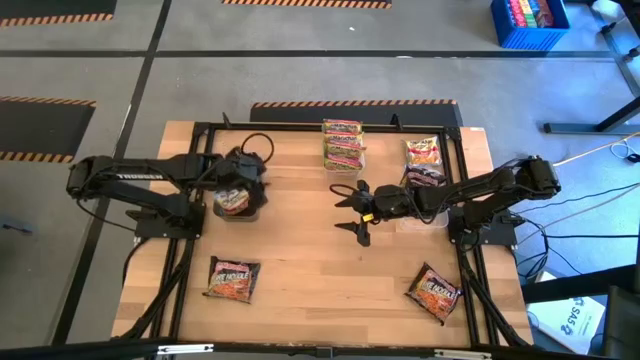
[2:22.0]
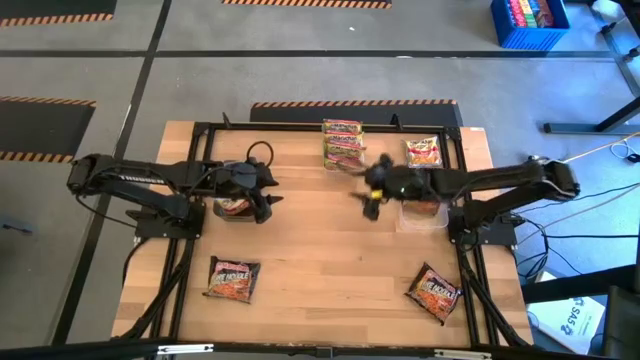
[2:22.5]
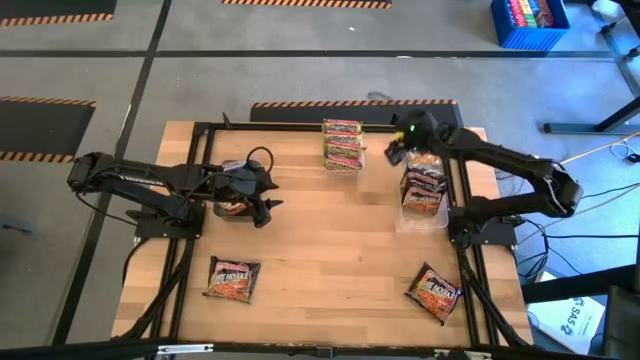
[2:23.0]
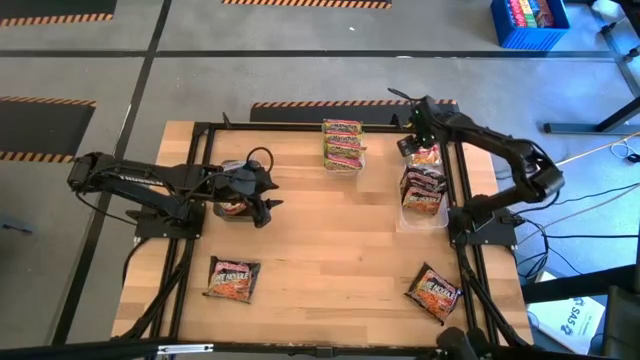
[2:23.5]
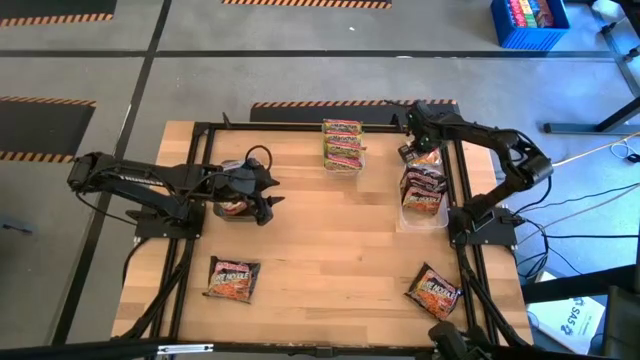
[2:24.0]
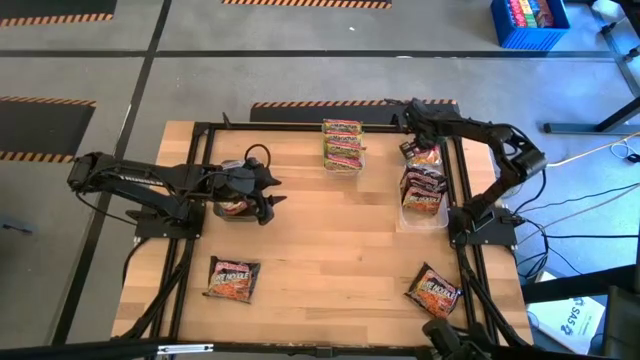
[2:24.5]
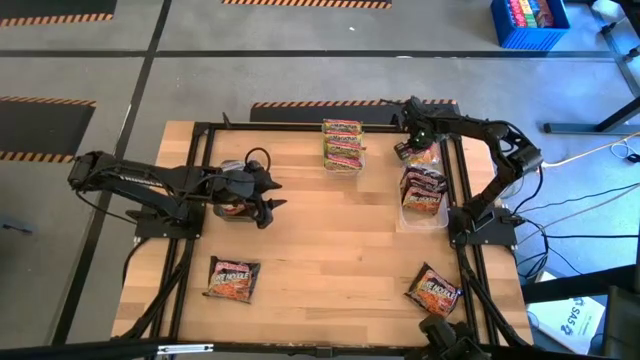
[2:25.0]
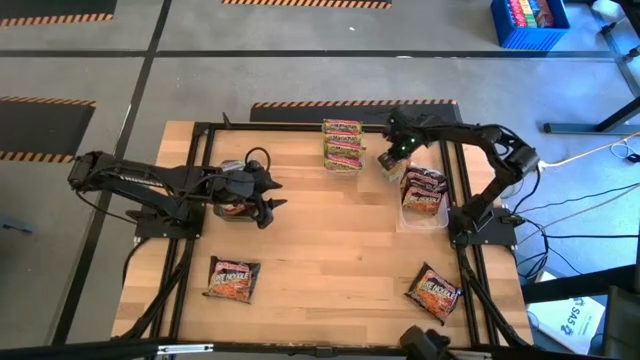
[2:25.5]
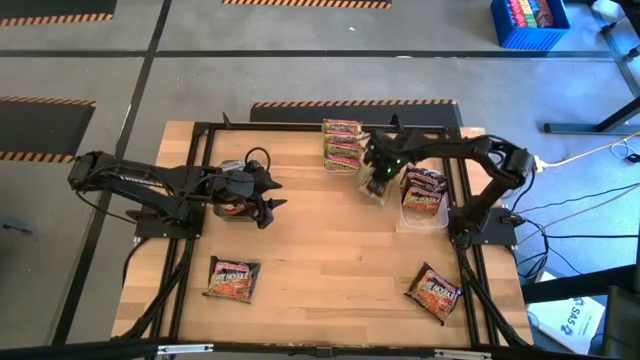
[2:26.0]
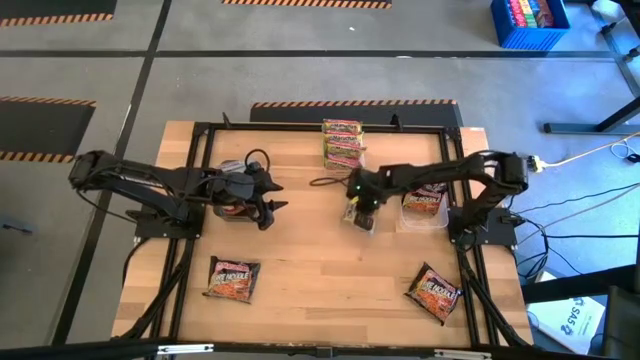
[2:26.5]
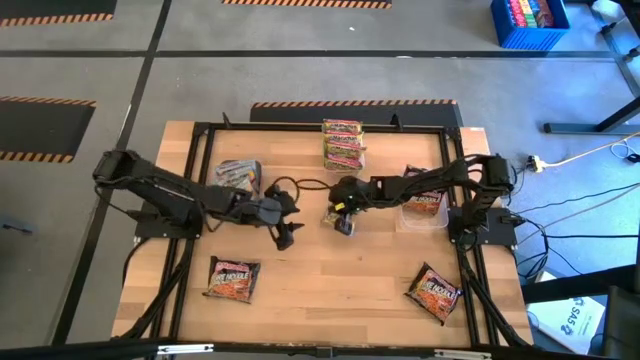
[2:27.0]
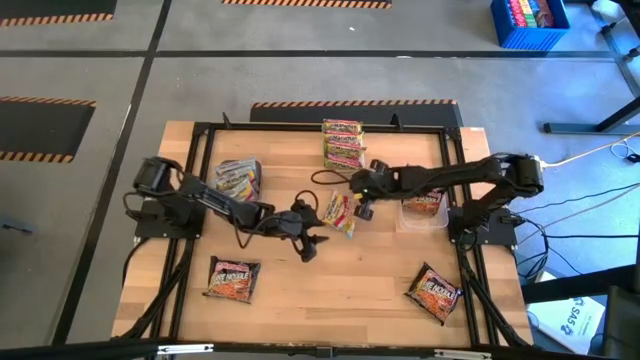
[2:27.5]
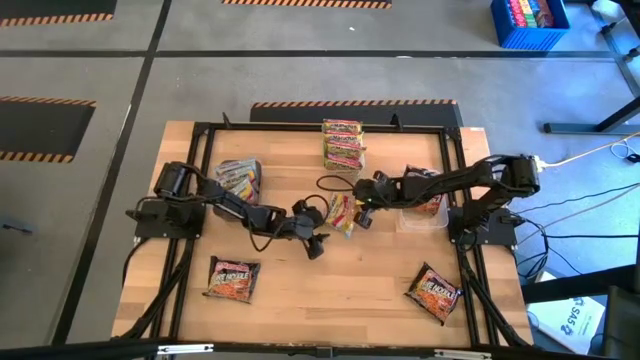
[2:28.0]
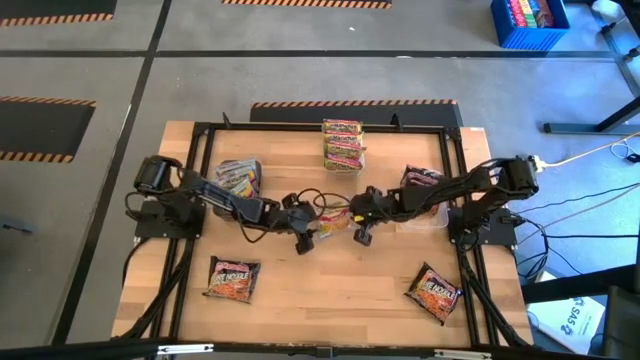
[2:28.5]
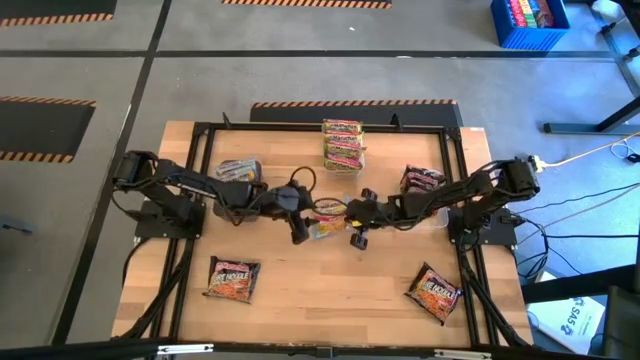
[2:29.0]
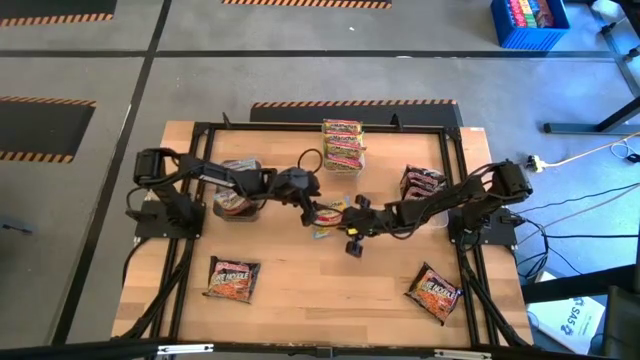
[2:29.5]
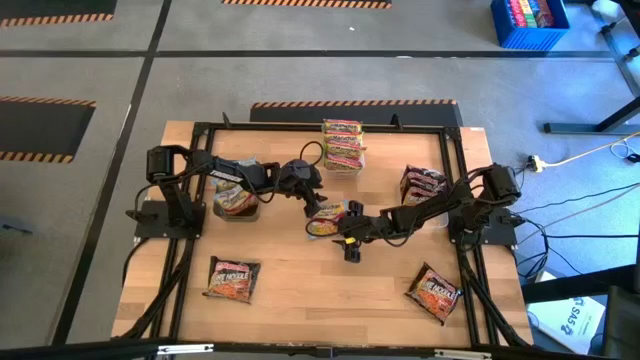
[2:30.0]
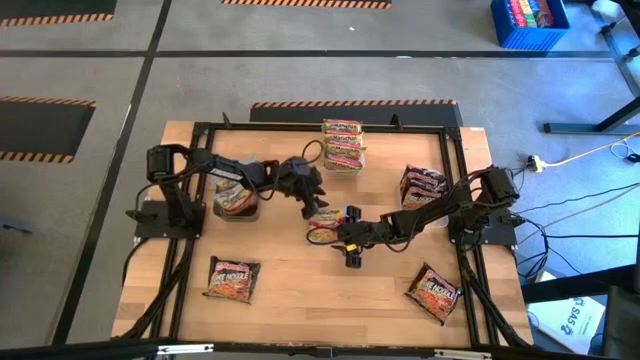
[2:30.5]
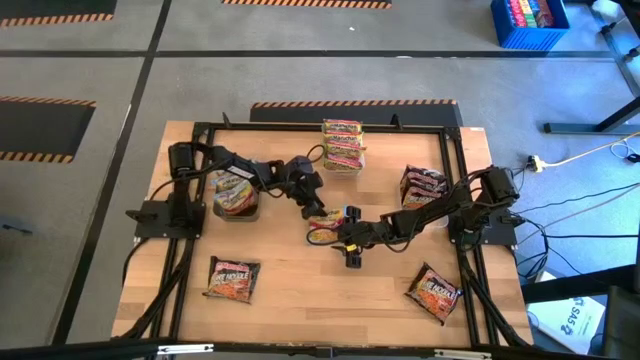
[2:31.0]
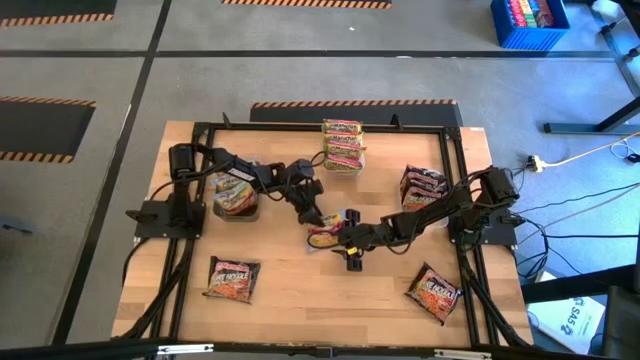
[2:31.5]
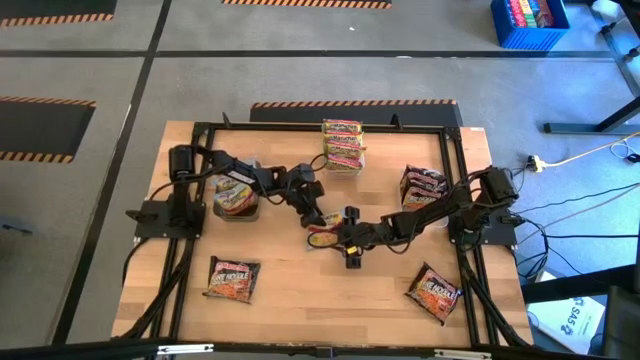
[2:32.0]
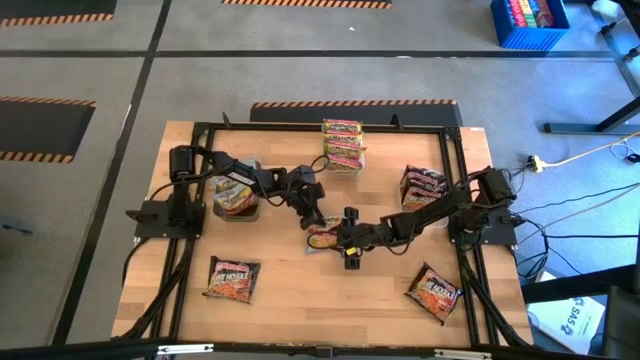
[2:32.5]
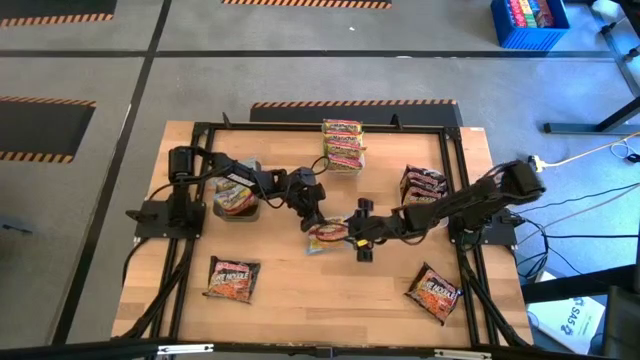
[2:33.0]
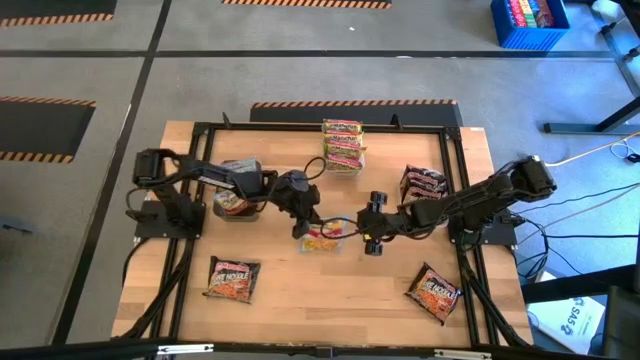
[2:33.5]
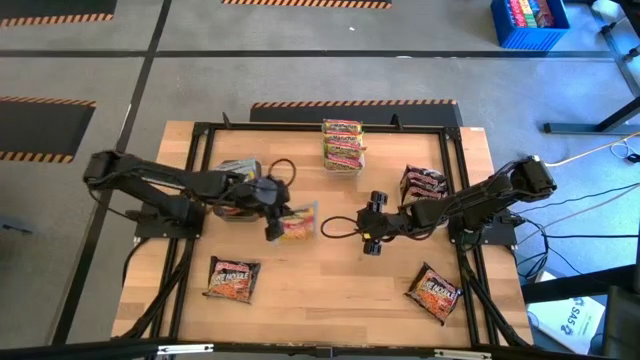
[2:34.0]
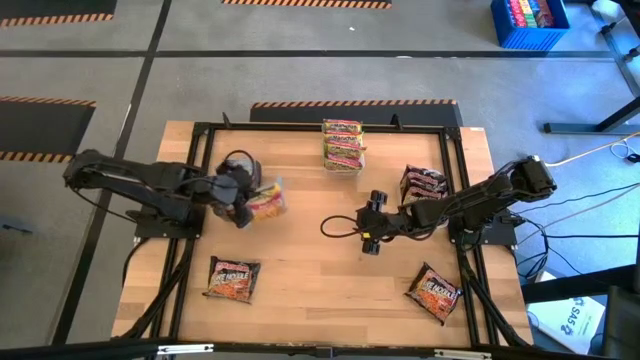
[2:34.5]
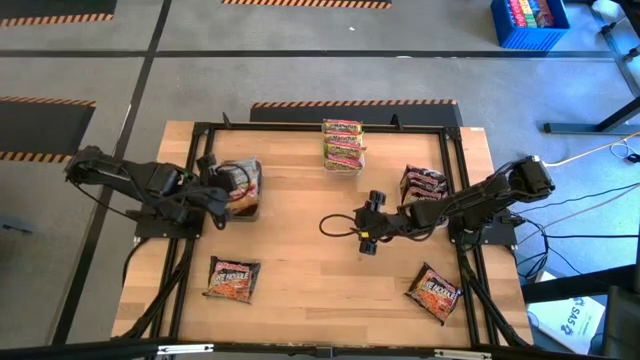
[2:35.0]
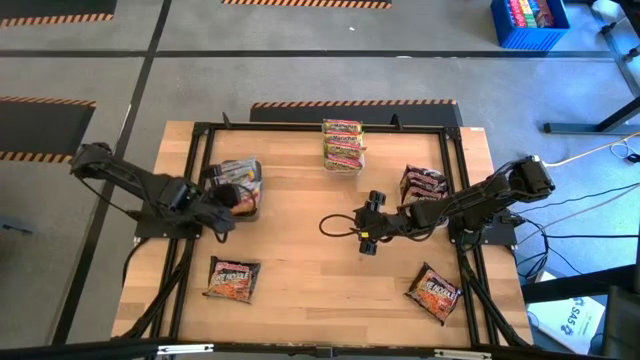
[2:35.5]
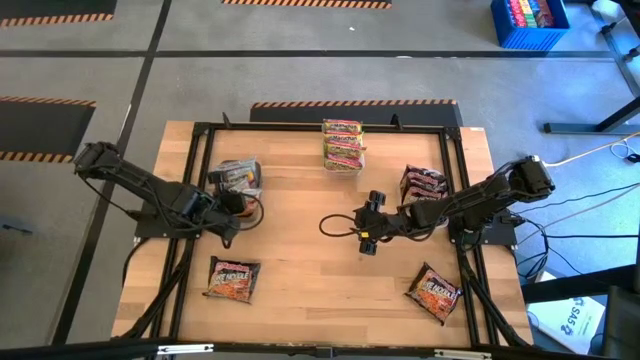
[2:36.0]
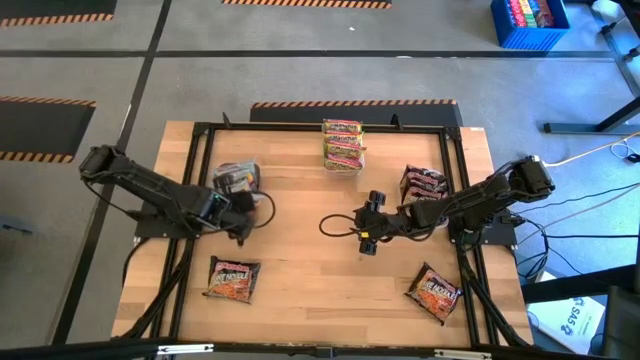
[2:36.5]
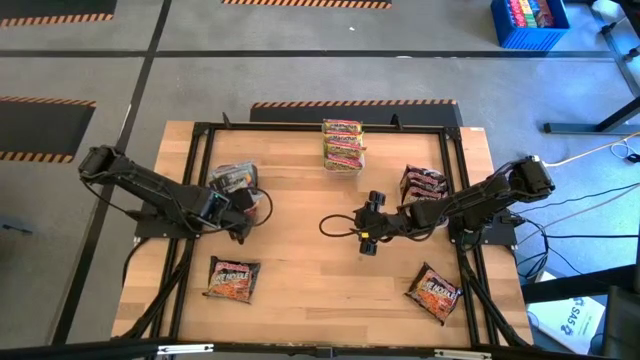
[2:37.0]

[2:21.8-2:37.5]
Task: Sort Maruchan noodles
Put the blue noodle pack into the black bin

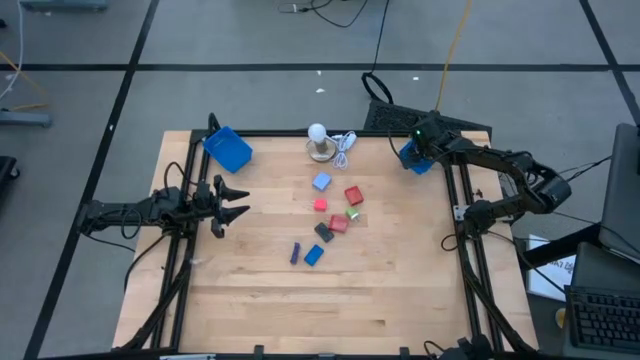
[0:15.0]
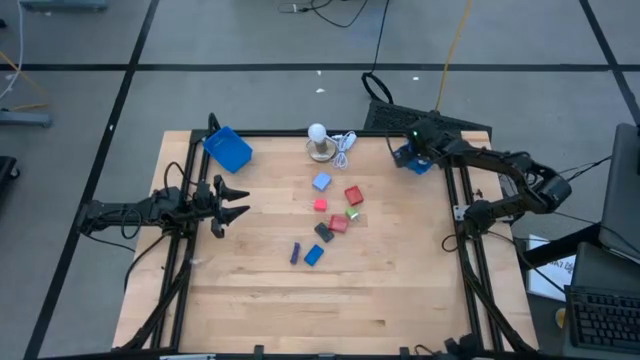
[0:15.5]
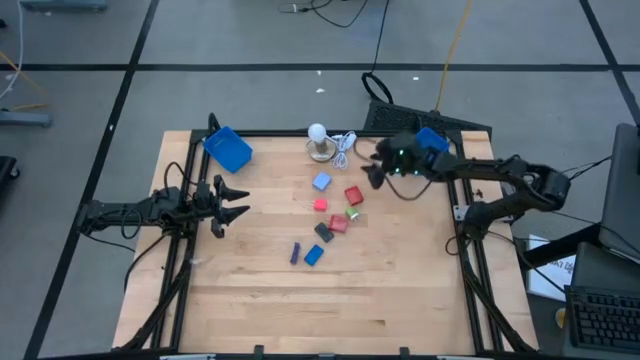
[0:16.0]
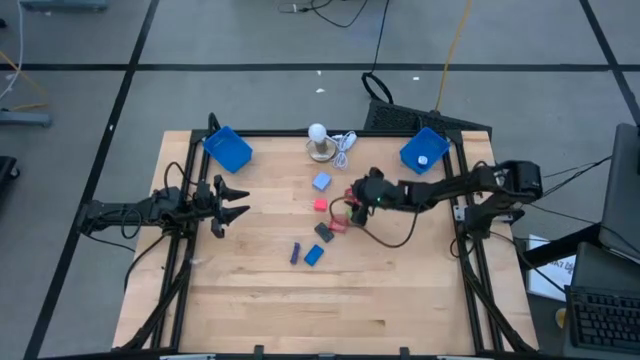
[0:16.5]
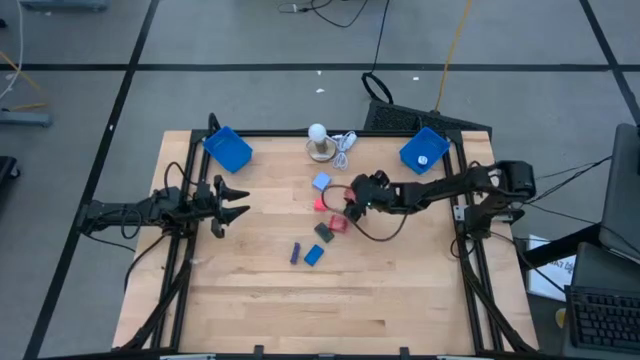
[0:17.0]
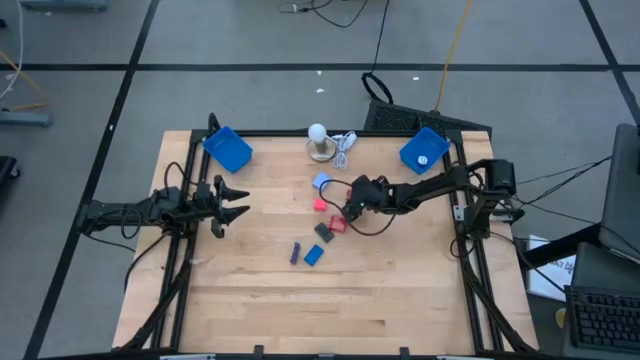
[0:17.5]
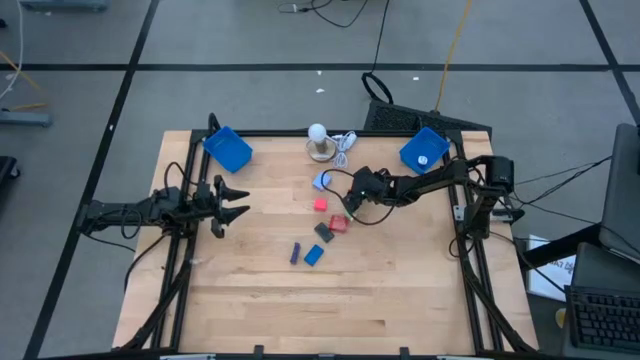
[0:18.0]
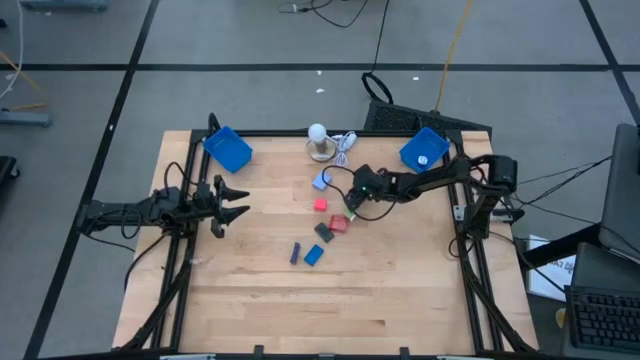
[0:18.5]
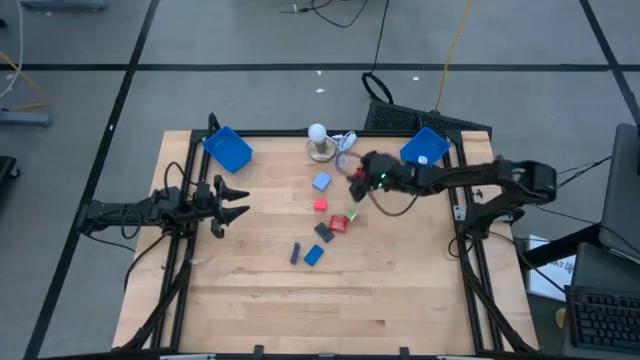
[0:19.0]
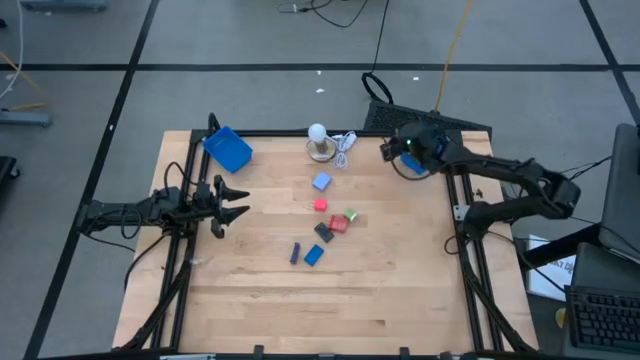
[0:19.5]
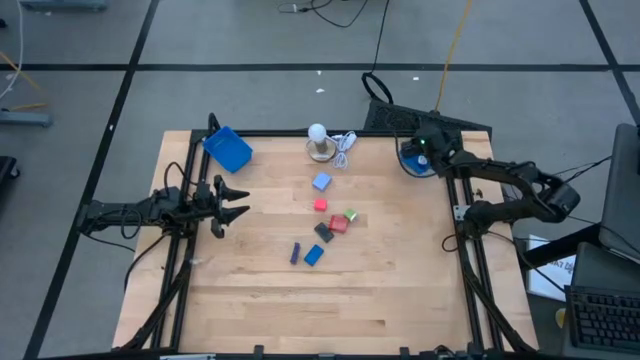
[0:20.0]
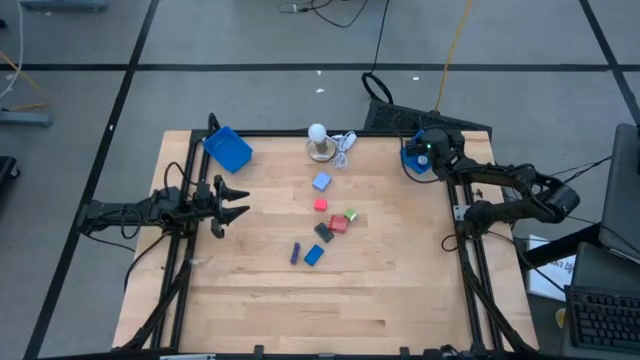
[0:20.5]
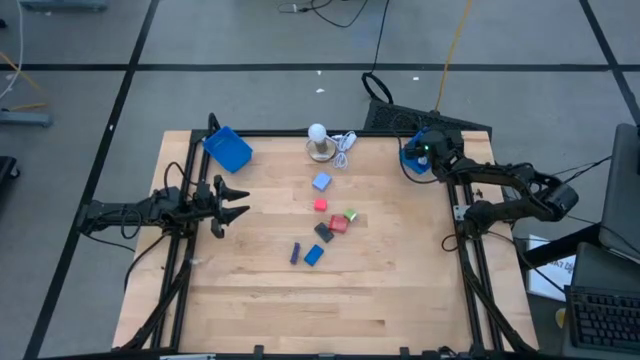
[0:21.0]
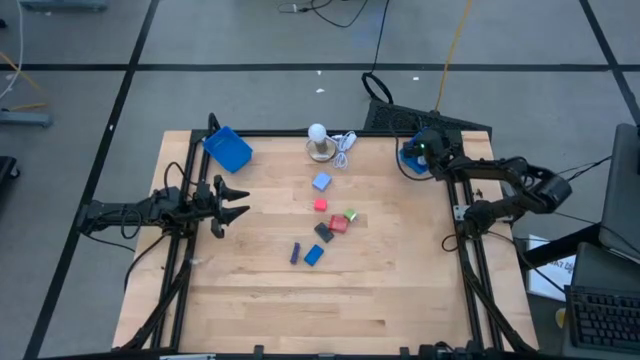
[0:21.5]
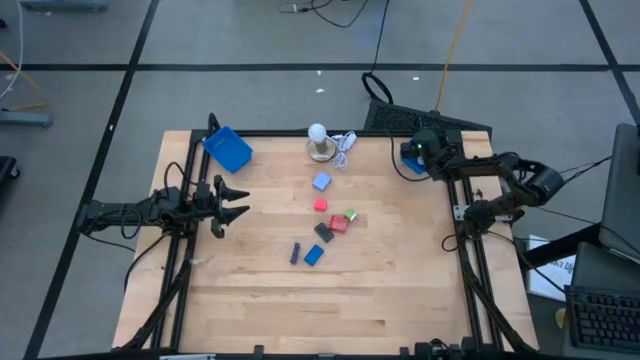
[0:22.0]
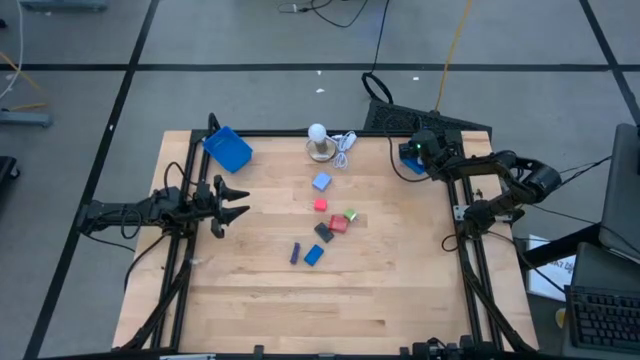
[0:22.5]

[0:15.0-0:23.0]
Task: Pick & Place Office items
Put the right red charger adapter into the right blue bin
